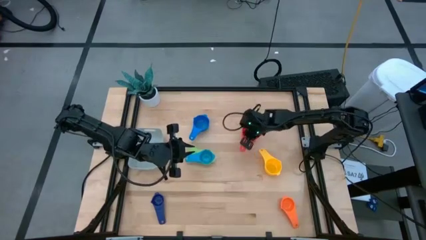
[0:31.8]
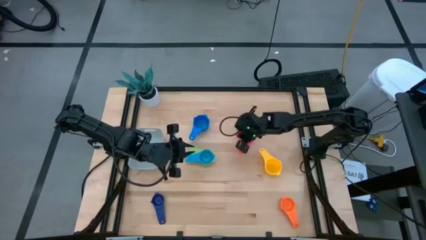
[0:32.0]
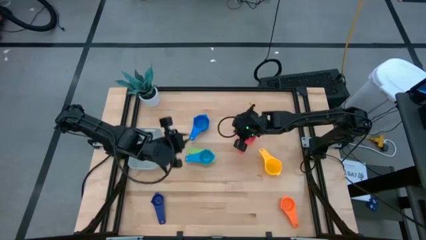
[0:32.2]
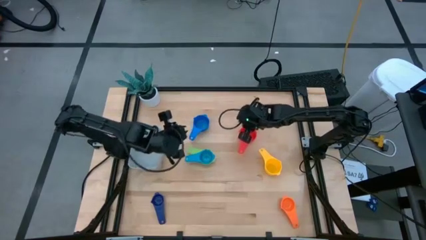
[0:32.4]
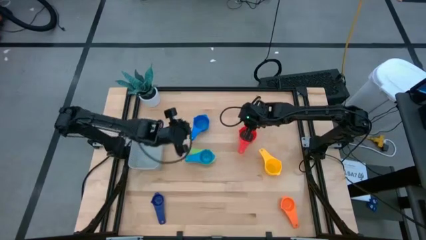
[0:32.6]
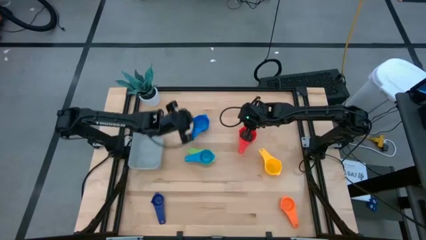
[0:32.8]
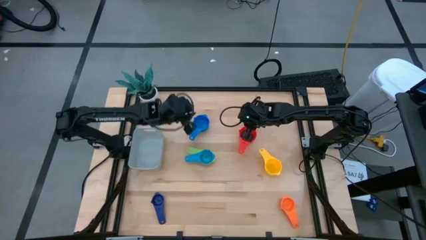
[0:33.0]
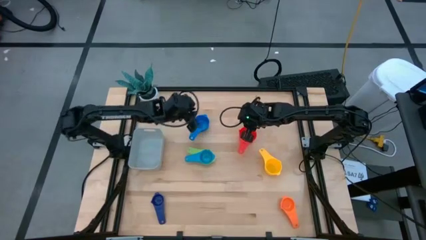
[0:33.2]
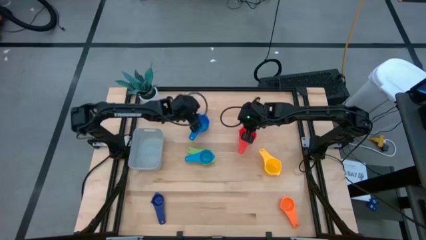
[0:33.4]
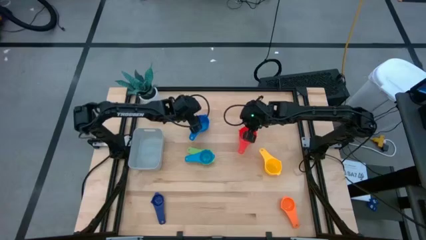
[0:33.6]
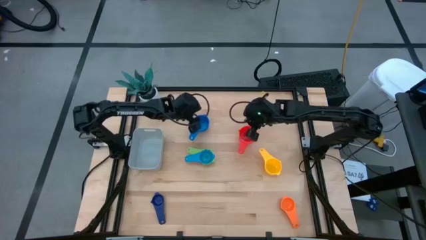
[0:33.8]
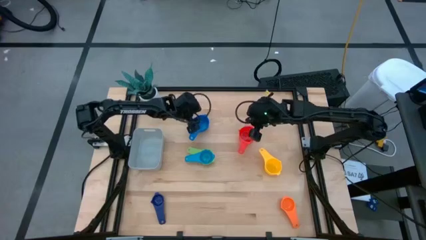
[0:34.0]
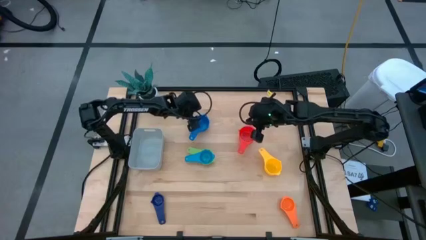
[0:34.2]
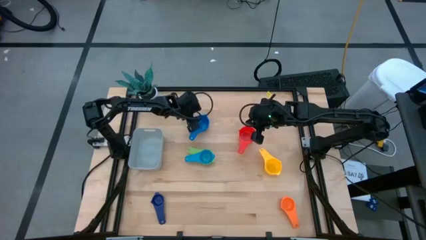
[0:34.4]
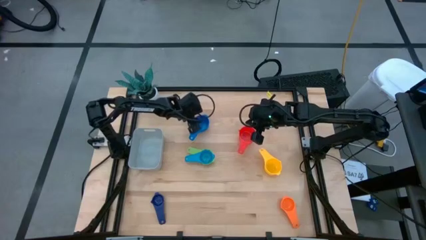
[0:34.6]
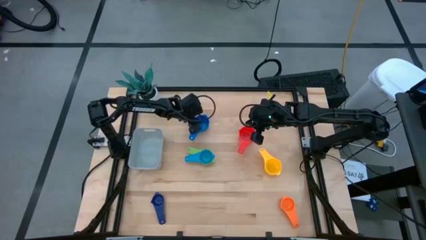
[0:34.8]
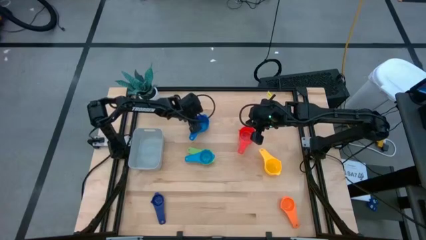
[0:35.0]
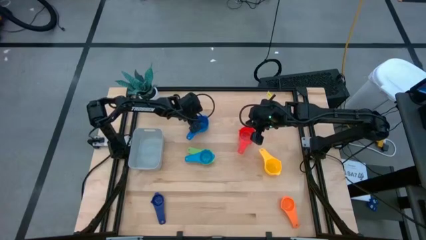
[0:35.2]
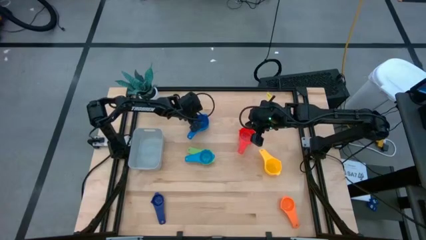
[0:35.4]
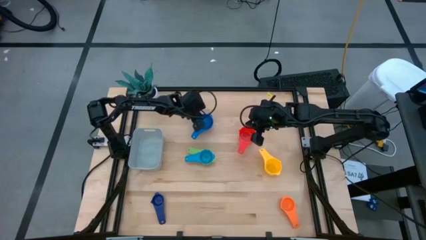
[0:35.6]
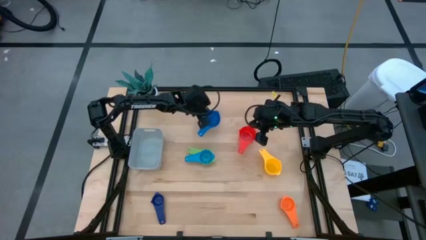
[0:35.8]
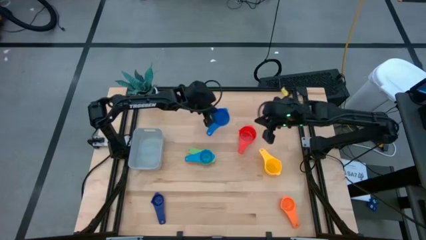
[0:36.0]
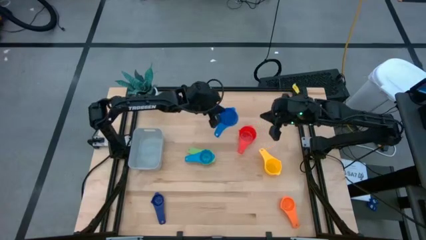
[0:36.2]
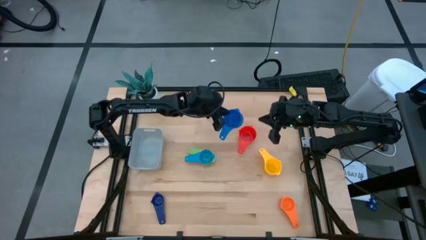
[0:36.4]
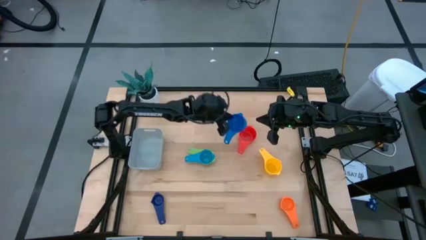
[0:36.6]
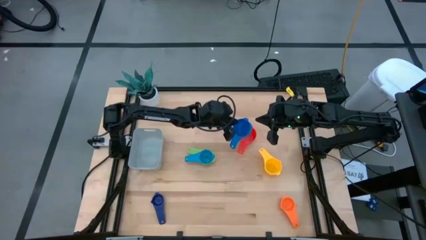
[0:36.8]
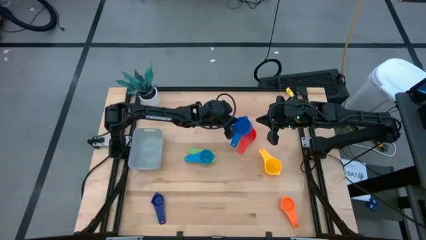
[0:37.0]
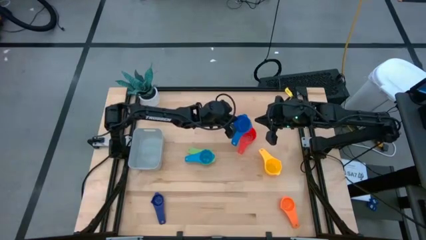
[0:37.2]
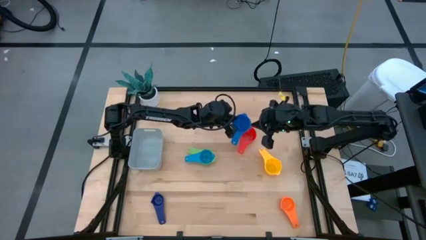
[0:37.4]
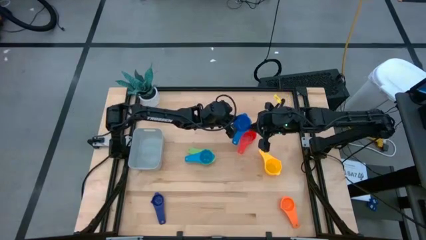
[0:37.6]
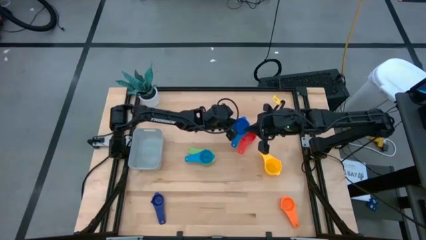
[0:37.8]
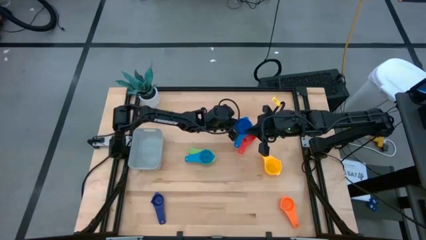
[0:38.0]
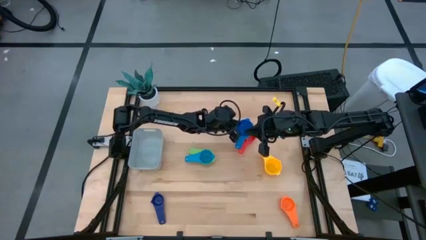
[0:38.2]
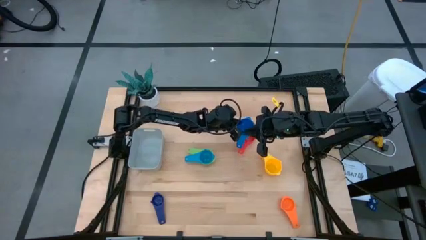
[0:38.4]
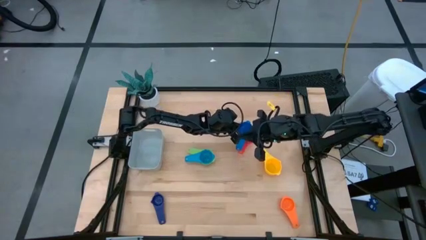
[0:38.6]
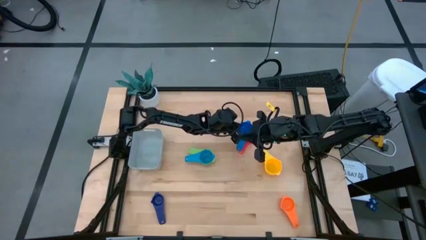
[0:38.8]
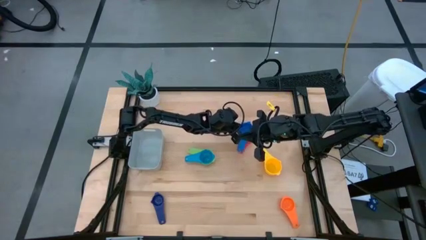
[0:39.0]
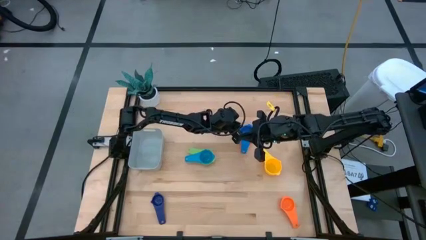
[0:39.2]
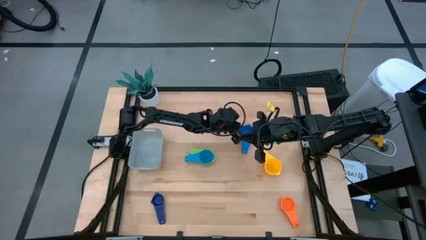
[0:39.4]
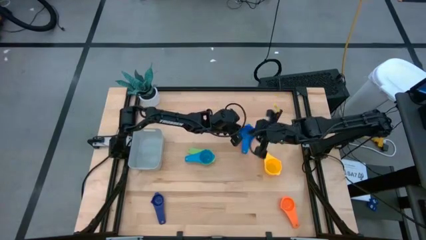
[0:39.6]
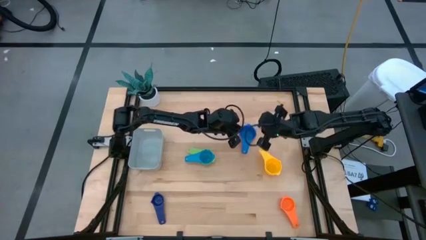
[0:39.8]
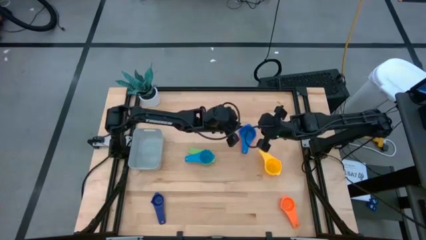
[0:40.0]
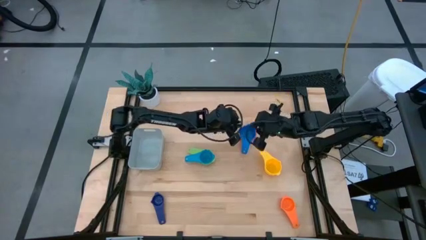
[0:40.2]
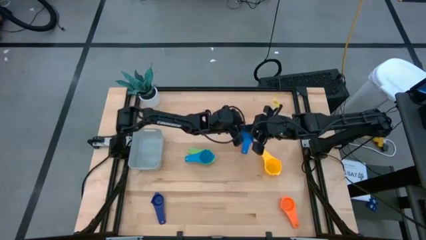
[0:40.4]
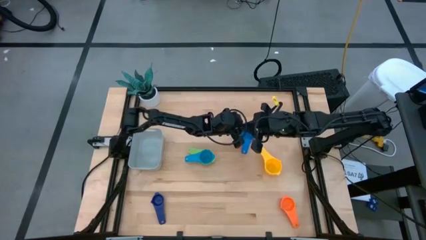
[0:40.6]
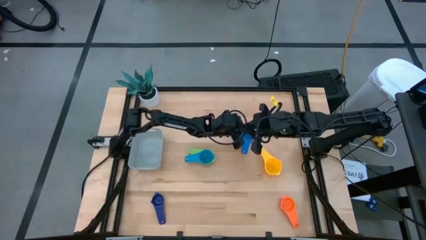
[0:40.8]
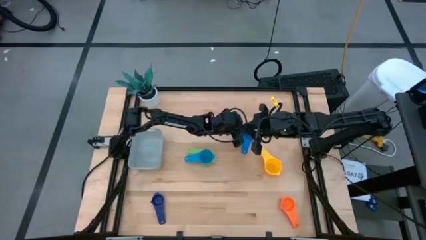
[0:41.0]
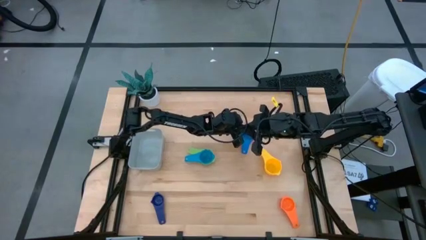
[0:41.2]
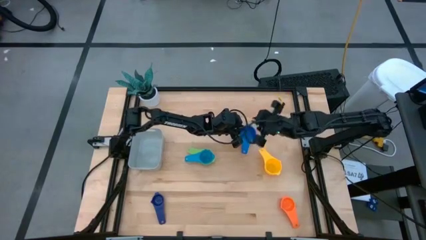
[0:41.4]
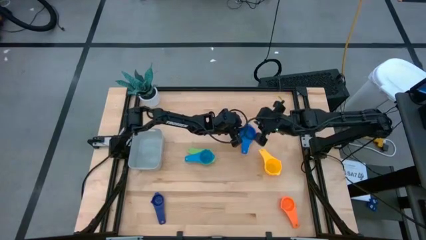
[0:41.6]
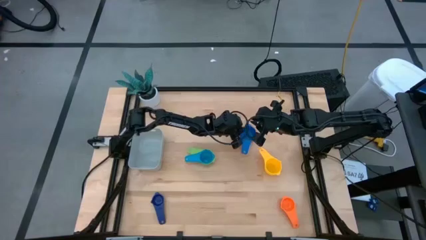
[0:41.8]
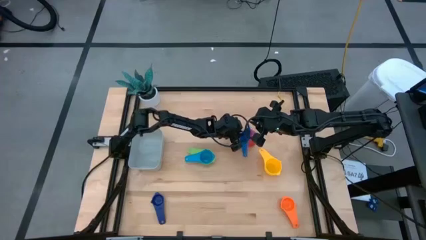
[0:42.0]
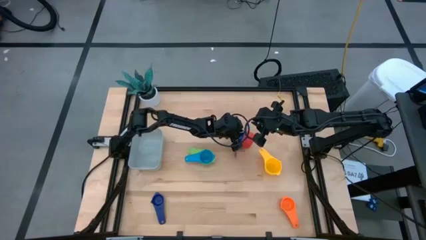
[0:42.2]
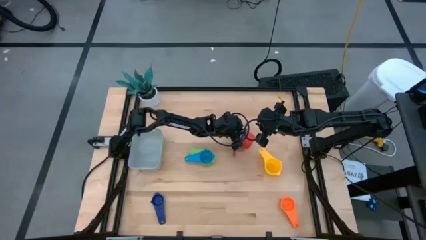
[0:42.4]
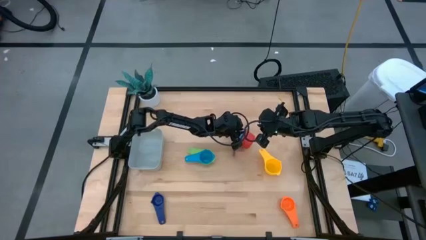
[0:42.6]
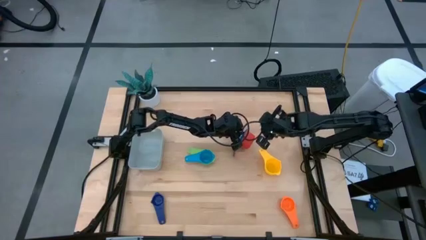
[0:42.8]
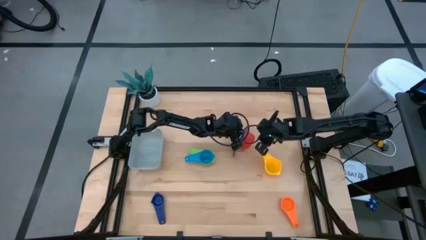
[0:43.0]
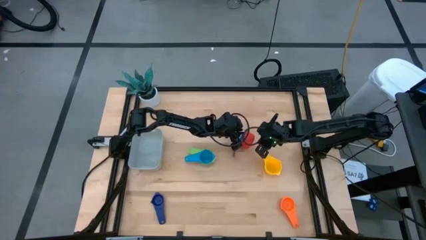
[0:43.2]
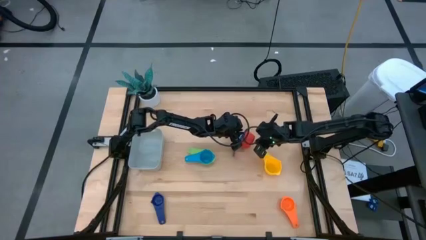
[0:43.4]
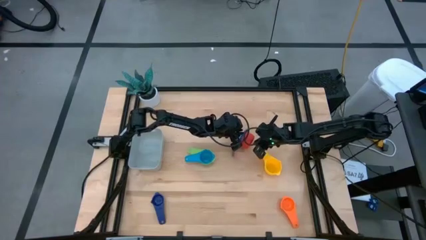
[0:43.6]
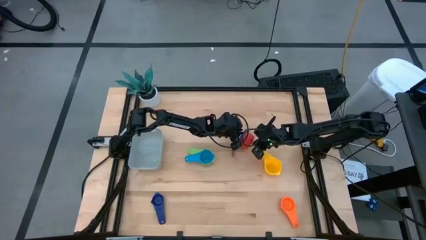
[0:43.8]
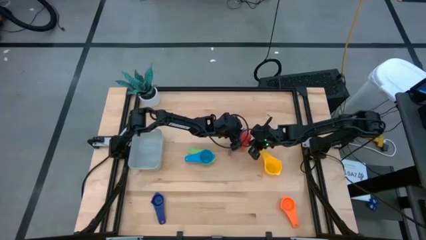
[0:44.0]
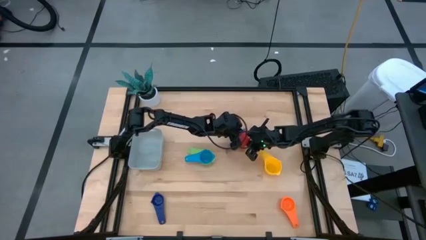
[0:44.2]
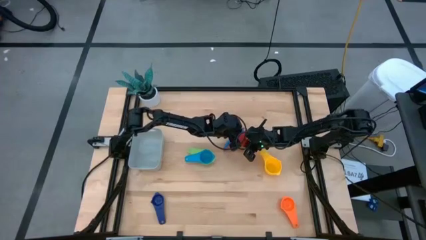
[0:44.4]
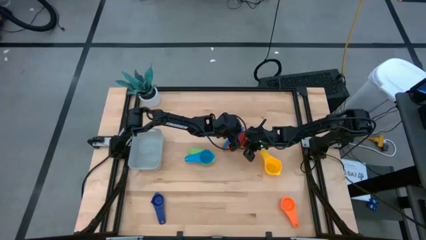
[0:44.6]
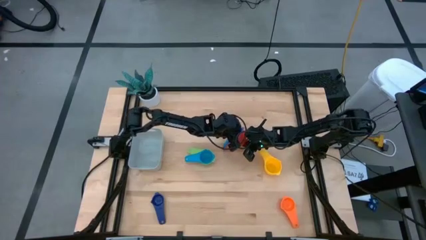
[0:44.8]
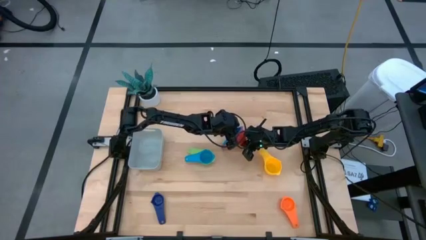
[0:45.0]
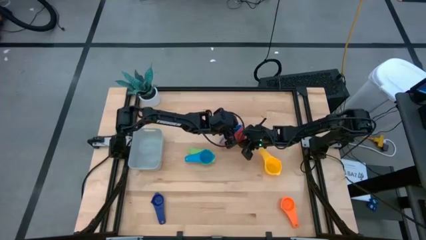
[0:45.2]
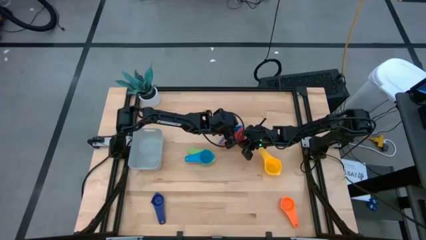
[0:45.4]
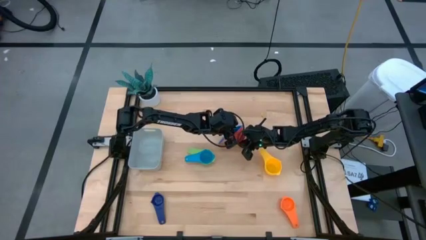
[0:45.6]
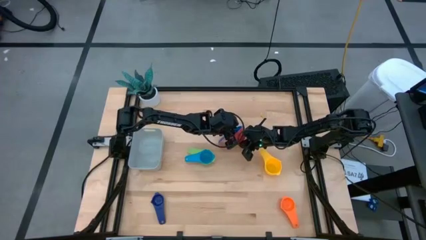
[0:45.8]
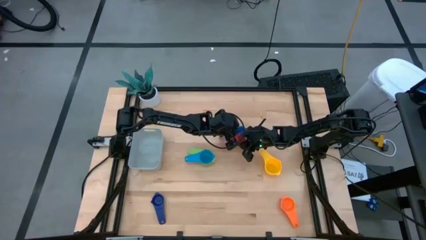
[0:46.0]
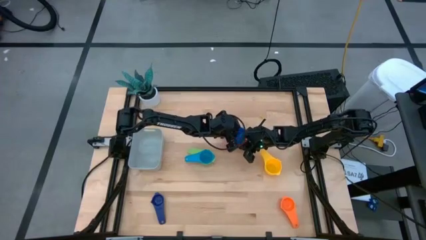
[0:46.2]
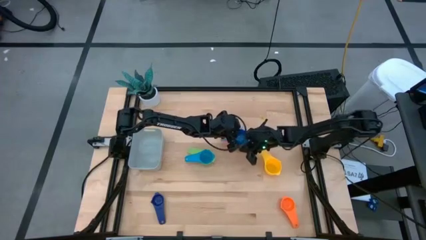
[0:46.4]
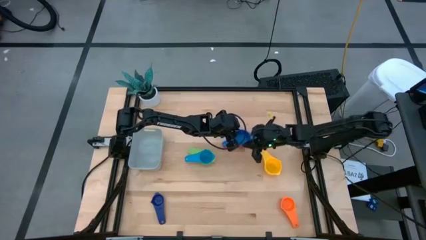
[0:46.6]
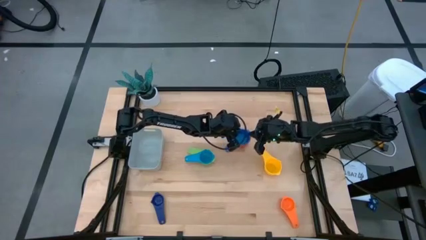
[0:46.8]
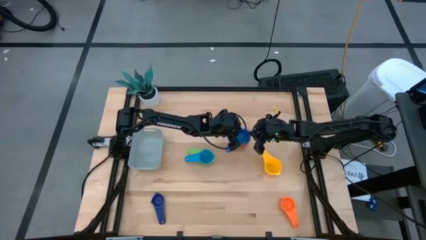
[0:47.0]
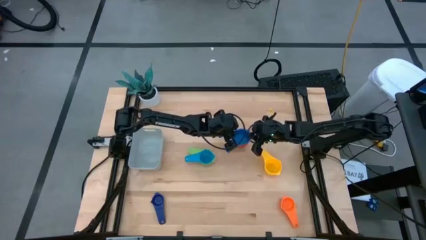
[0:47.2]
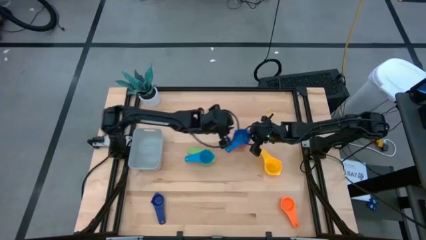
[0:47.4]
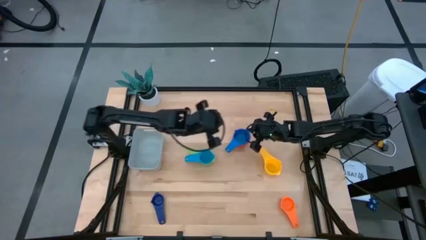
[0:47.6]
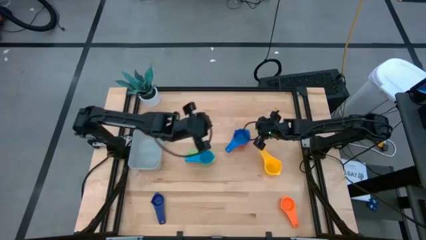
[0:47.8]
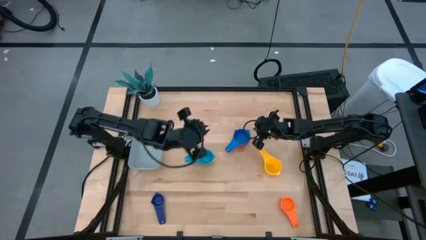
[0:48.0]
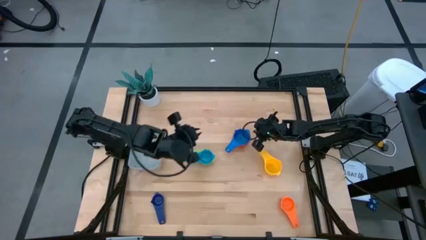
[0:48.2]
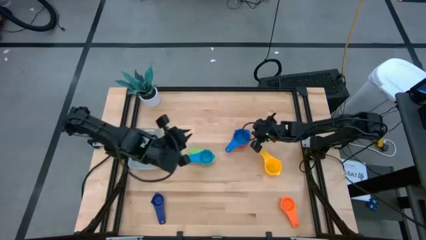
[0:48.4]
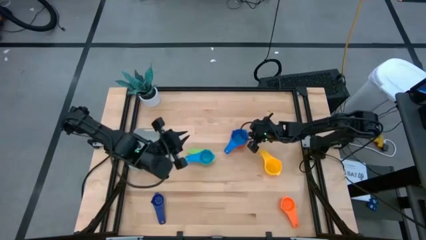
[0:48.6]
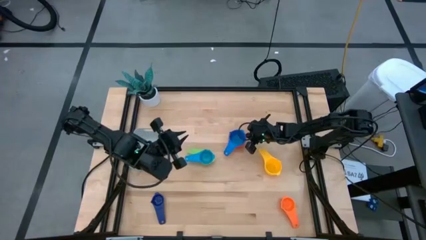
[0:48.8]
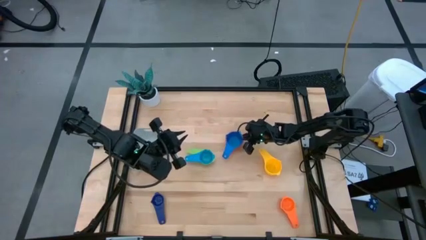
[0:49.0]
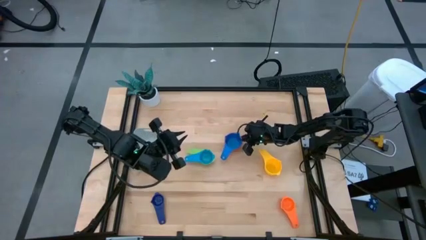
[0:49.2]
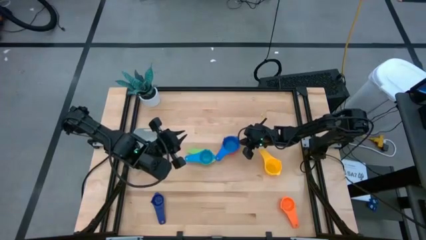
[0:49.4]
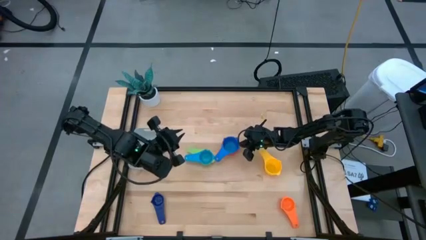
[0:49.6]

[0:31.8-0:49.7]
Task: Nest measuring cups in basket
Stack the top light blue measuring cup on top of the red measuring cup
